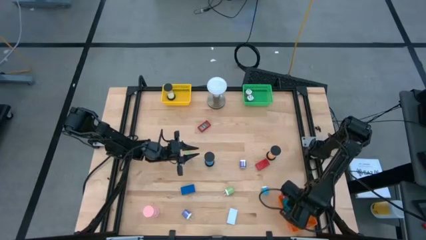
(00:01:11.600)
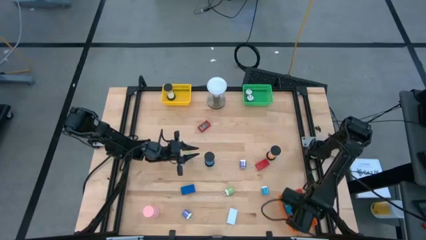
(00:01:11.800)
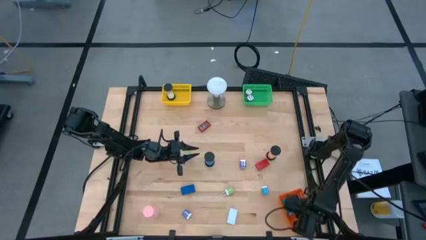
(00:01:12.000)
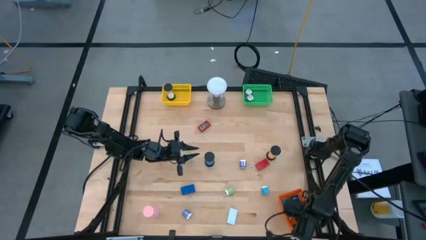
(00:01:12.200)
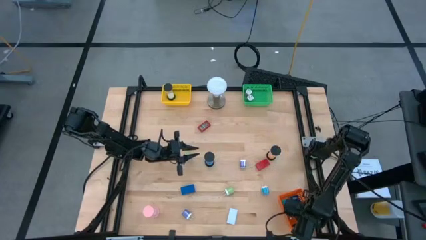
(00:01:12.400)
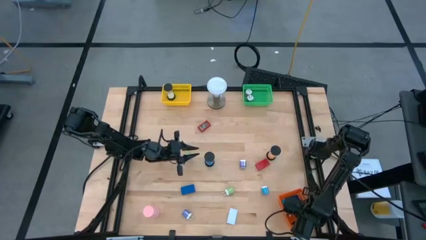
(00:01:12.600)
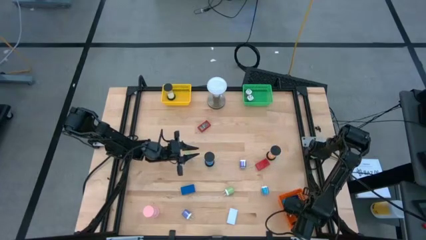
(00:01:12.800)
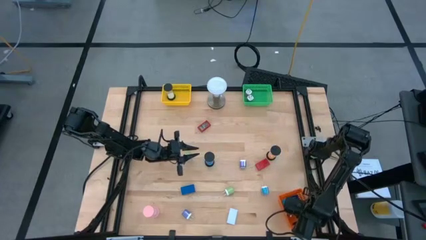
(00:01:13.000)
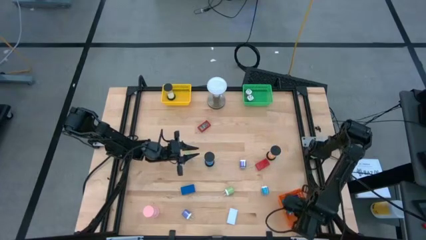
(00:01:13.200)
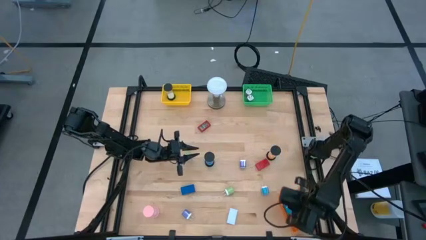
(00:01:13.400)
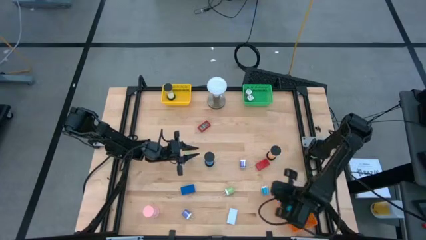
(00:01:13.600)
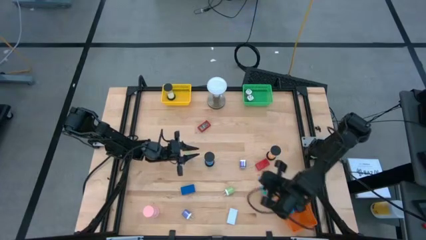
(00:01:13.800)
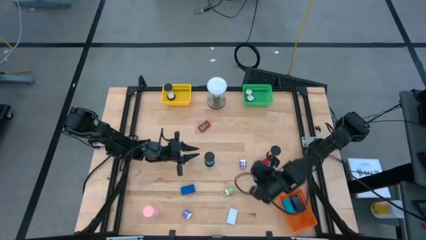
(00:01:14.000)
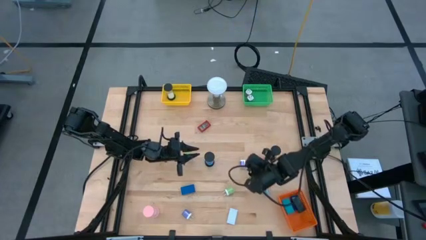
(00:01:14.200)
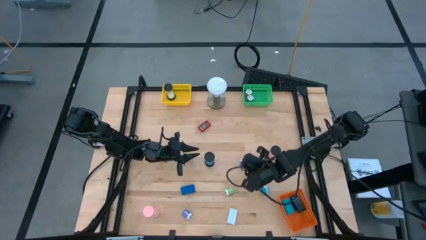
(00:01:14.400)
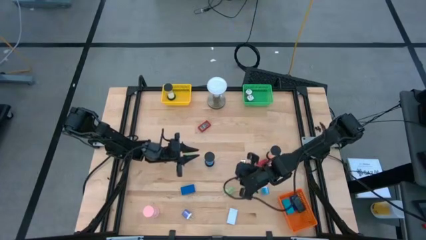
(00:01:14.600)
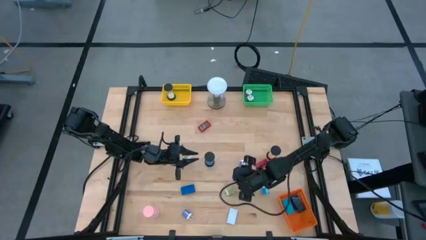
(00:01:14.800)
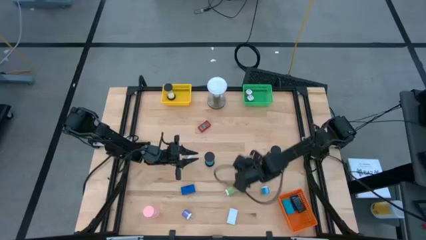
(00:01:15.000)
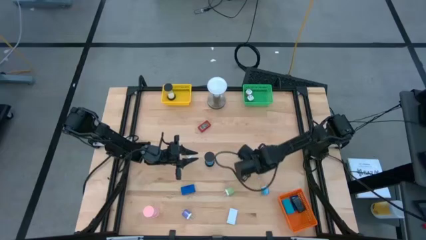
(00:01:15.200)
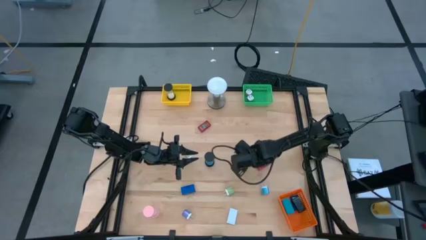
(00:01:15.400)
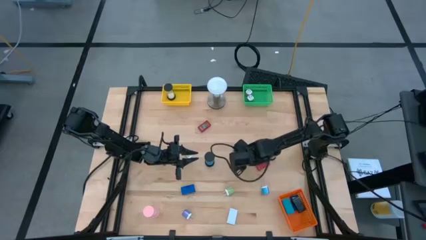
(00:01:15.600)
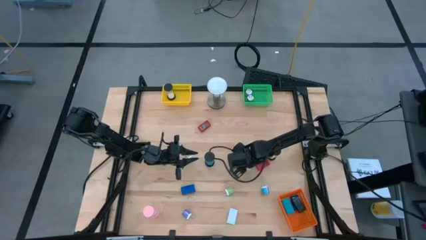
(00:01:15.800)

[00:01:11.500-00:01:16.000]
Task: Pick & Place Office items
Put the top purple charger adapter into the green bin

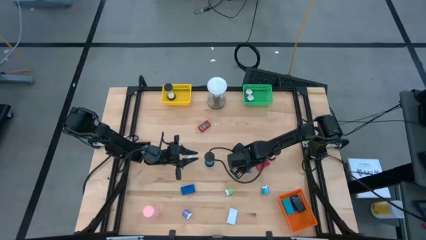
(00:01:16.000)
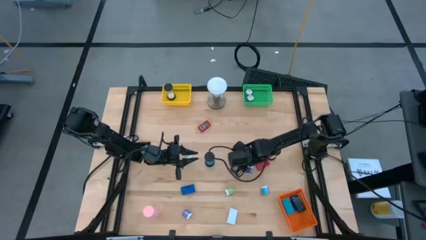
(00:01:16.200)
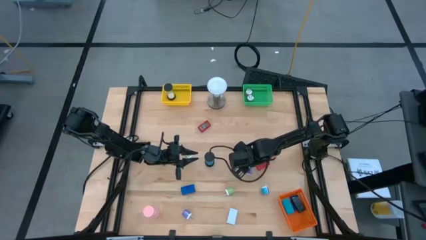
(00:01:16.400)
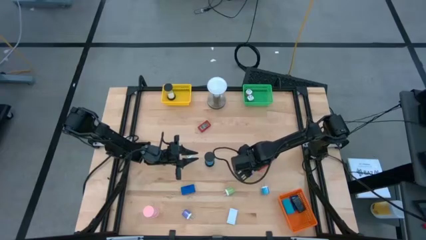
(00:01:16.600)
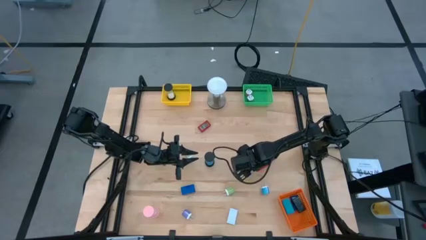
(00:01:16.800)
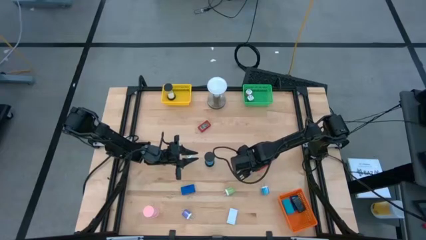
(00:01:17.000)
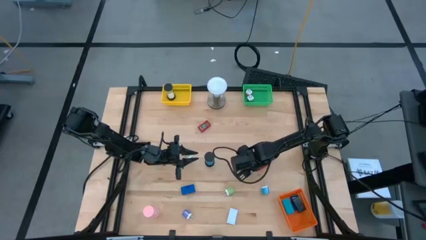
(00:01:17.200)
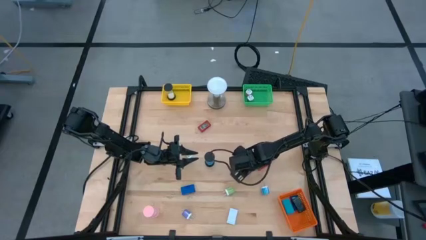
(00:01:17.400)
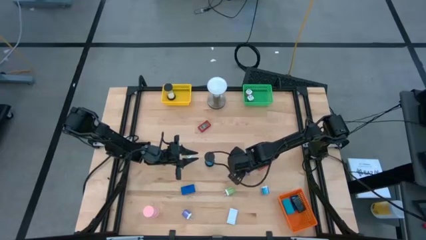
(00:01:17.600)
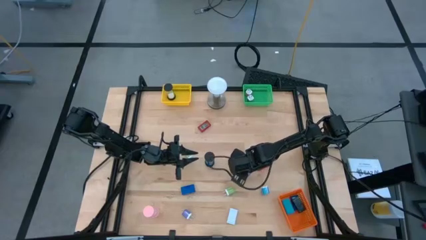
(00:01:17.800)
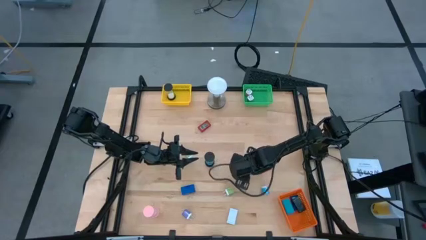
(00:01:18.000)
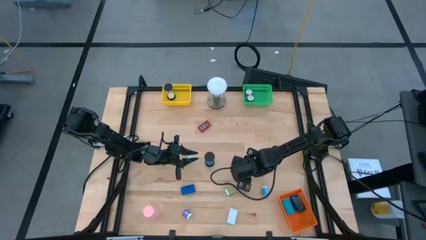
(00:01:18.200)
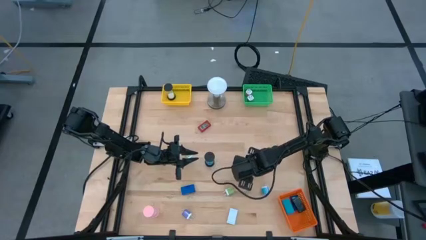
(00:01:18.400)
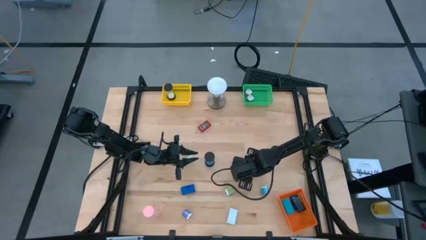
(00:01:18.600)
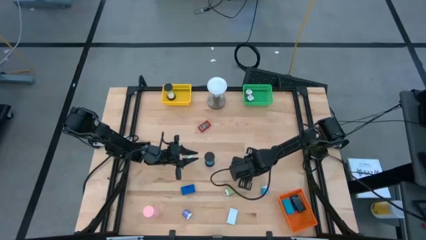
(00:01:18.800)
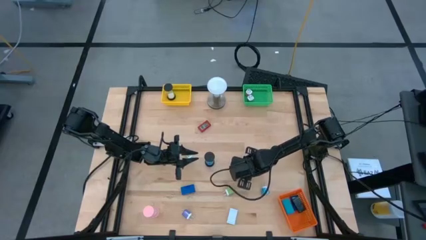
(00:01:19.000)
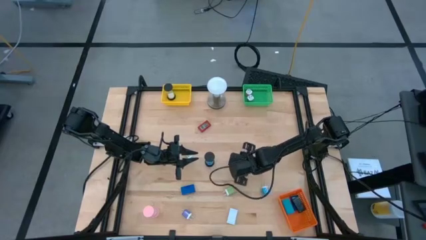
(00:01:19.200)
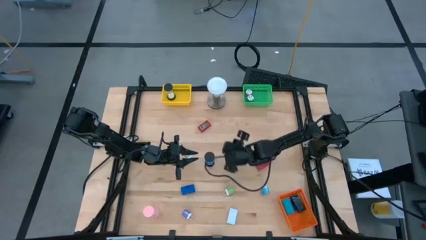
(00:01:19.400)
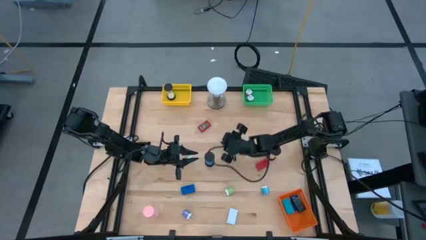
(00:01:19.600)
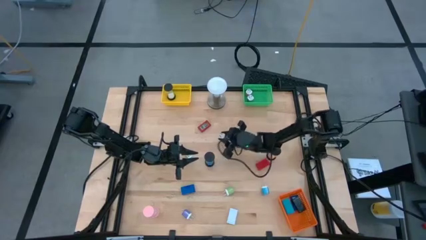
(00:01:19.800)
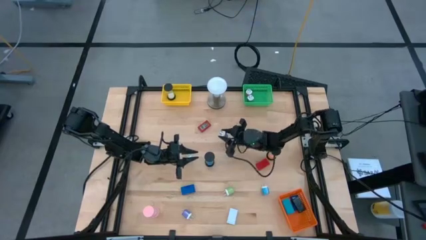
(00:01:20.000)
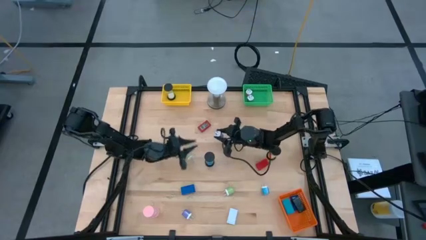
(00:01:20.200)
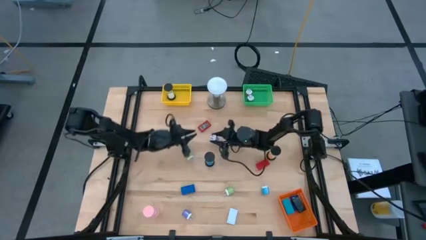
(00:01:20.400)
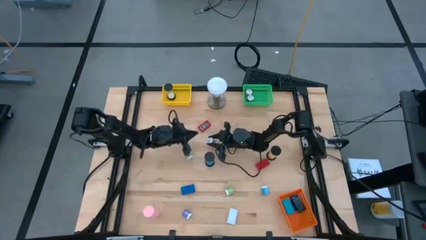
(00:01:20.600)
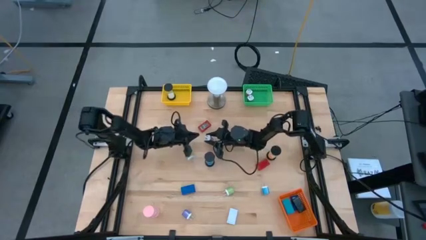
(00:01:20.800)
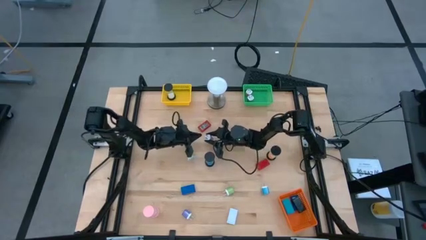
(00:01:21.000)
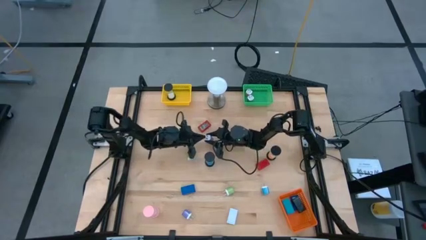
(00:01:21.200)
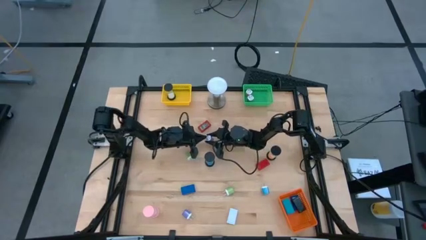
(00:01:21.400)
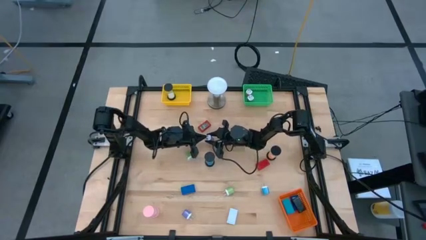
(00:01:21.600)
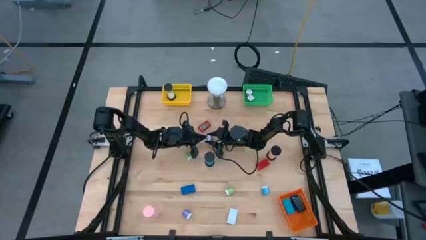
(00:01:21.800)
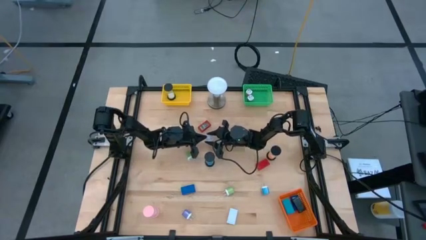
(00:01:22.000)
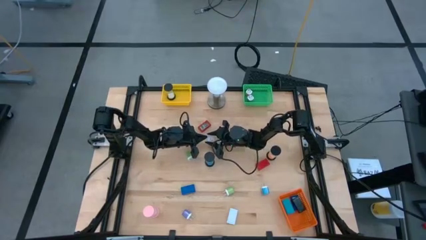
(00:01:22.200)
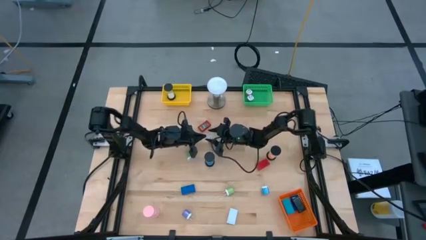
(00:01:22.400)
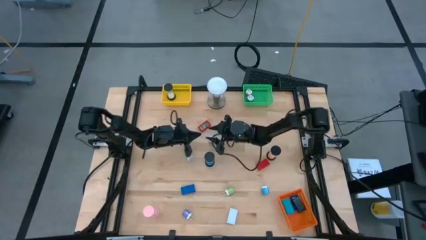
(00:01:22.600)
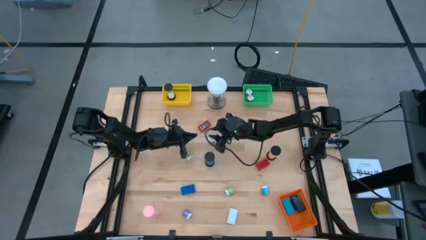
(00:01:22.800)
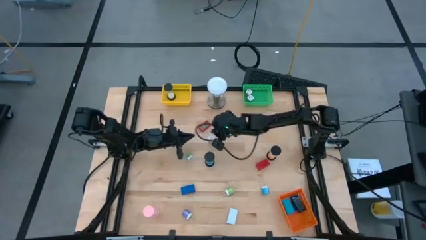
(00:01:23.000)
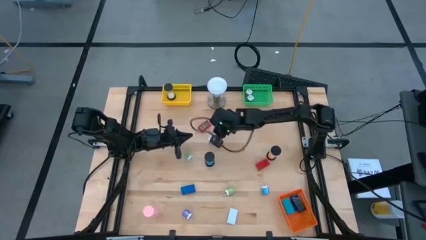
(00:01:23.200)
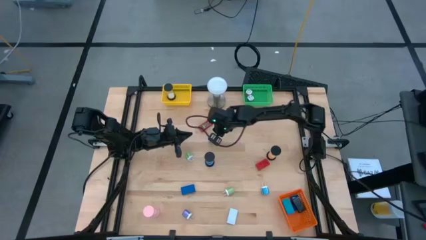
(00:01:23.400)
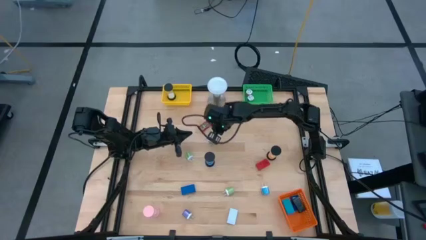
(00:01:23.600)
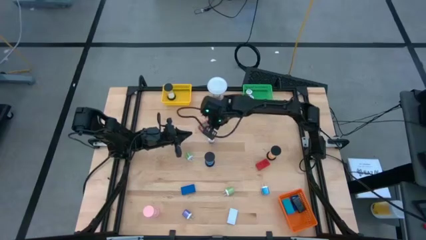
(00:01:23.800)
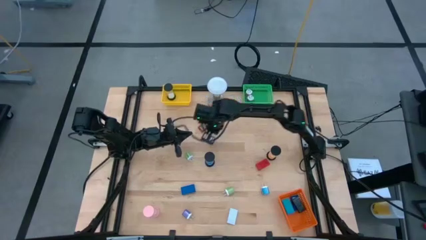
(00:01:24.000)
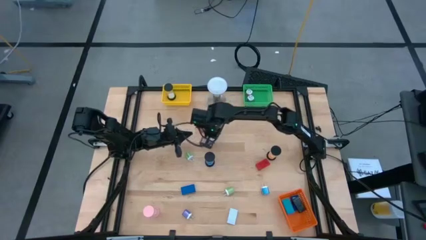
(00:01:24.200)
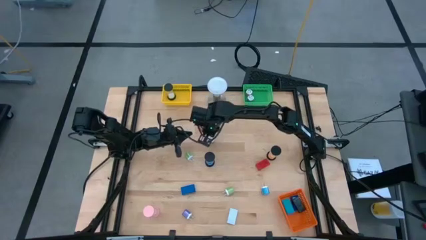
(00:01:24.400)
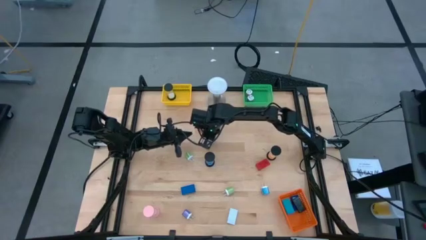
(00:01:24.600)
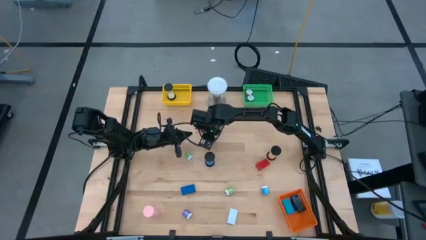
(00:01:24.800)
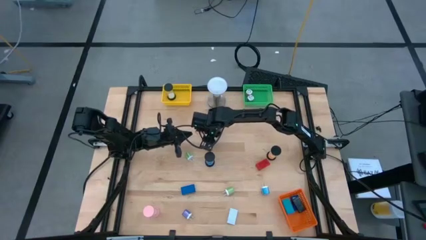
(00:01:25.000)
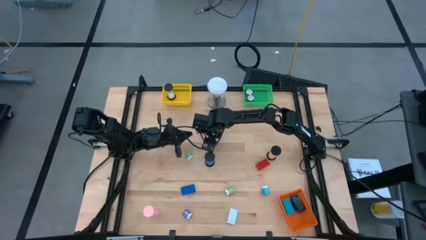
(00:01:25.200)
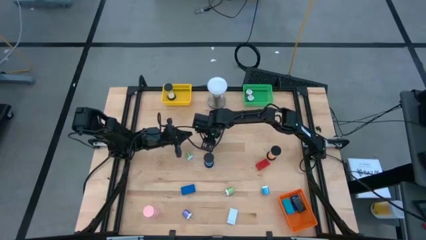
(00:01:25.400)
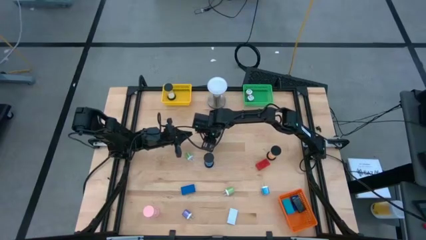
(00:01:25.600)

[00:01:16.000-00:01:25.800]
Put the top purple charger adapter into the green bin
